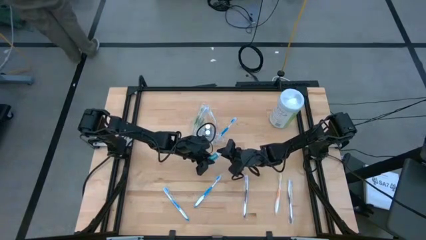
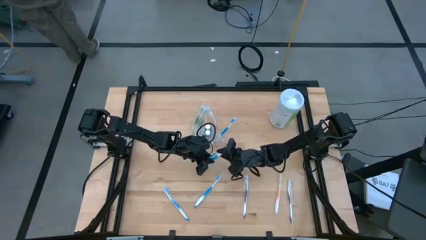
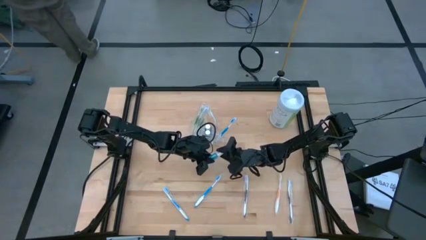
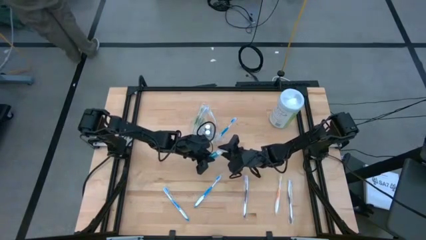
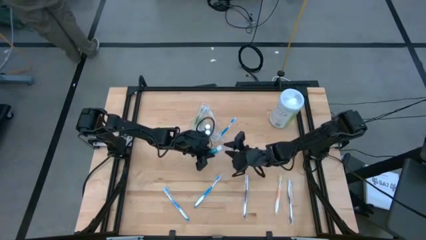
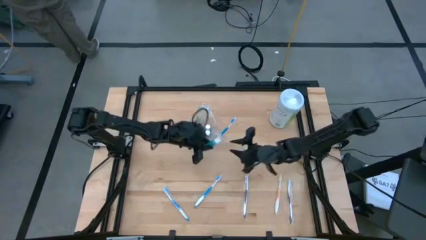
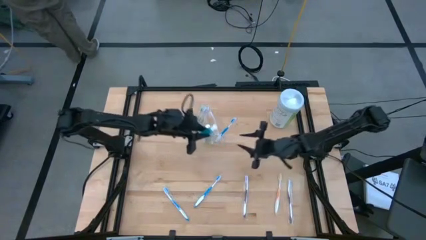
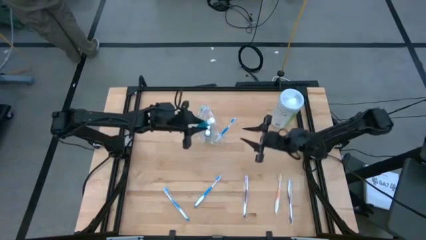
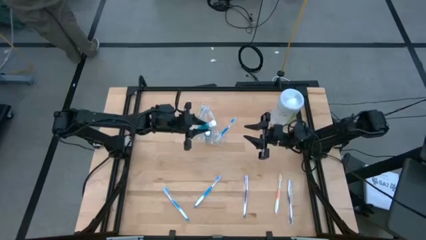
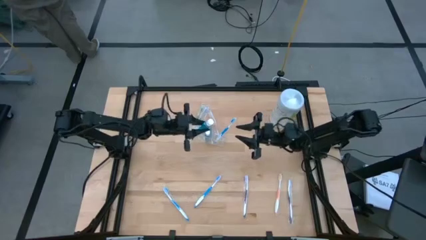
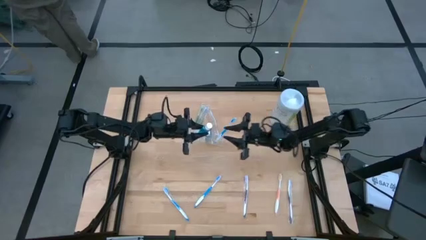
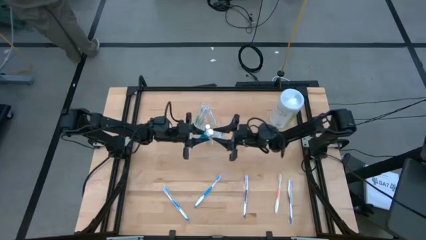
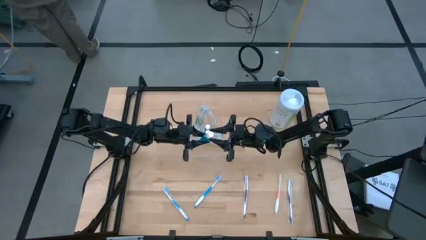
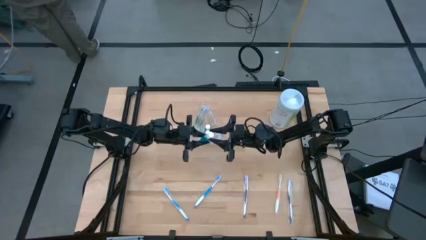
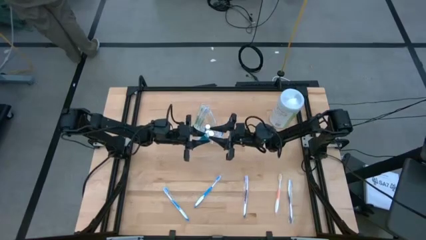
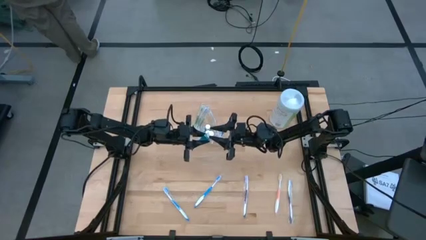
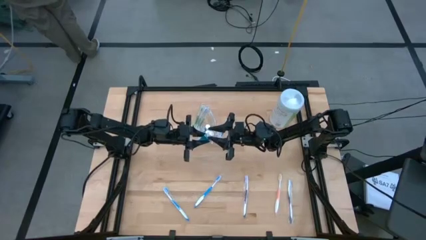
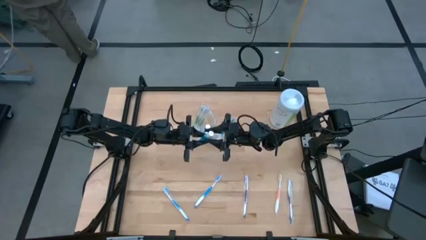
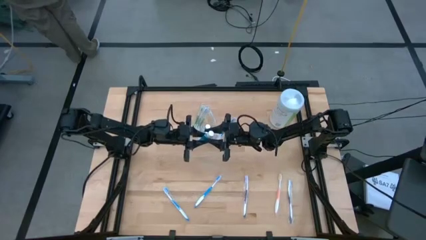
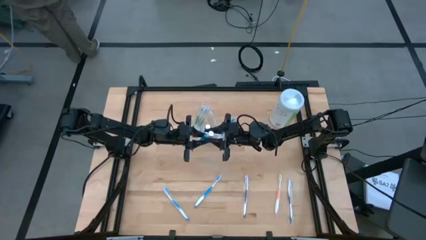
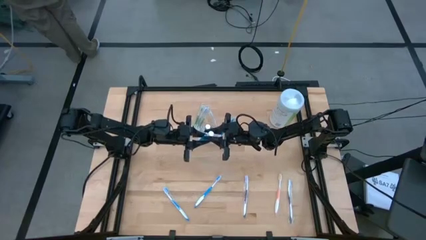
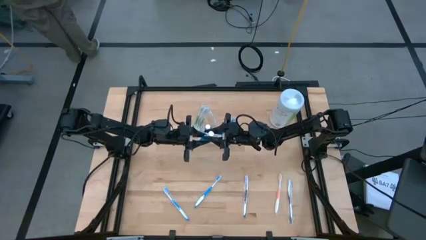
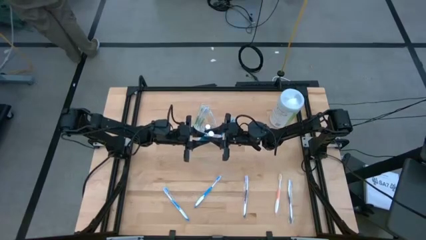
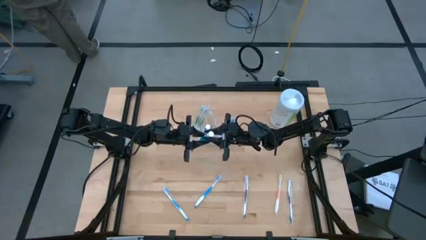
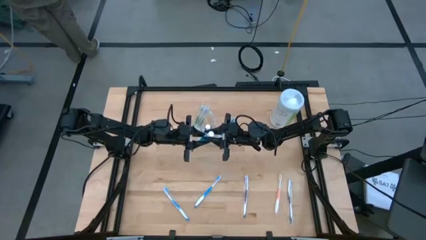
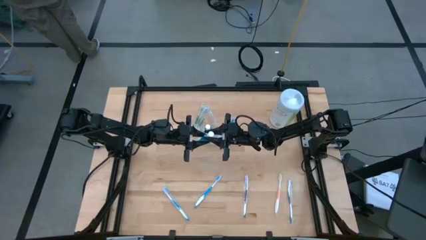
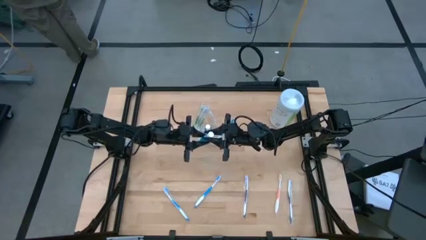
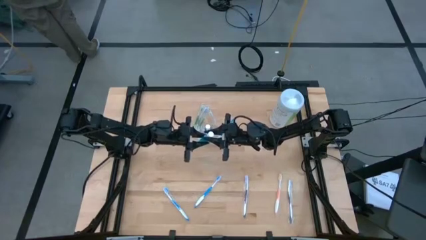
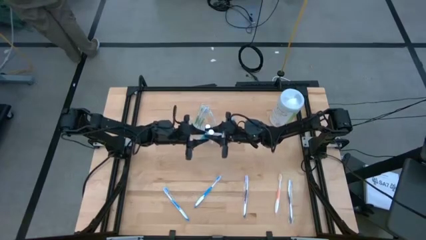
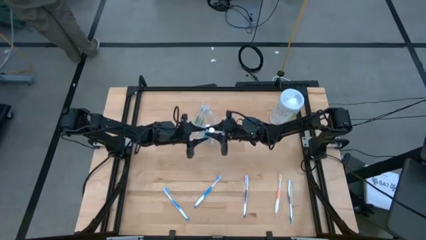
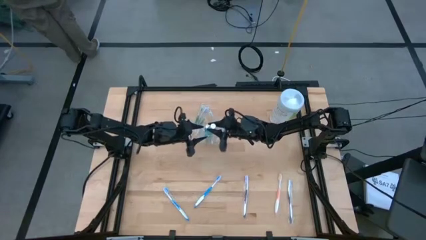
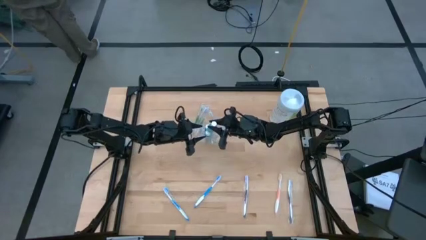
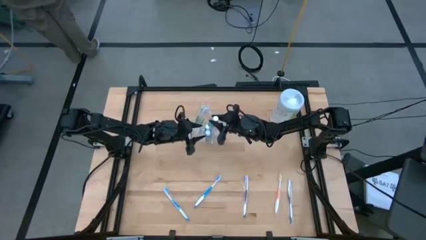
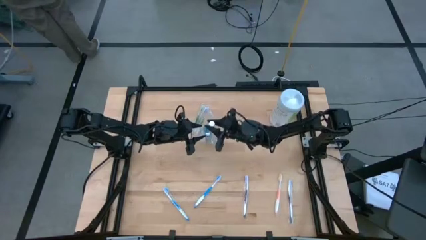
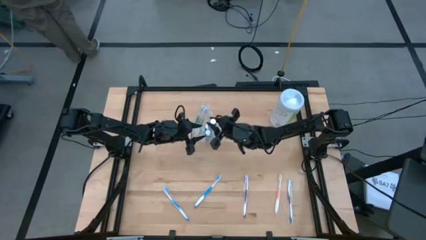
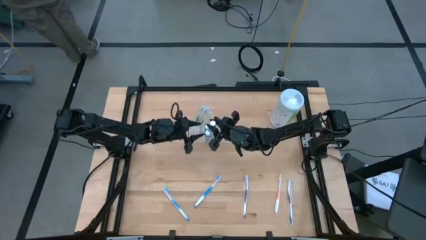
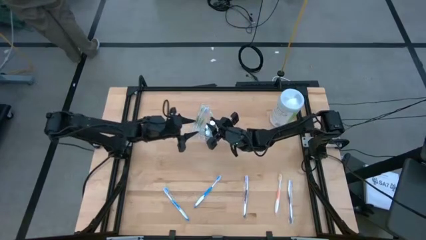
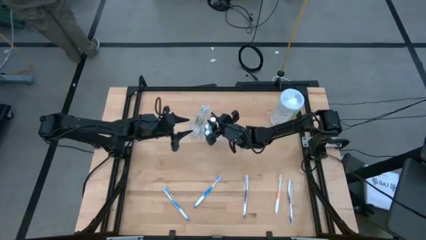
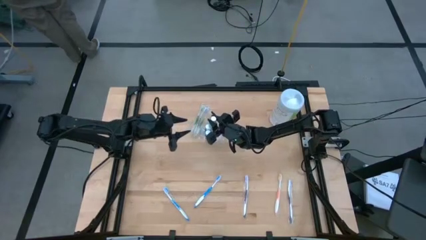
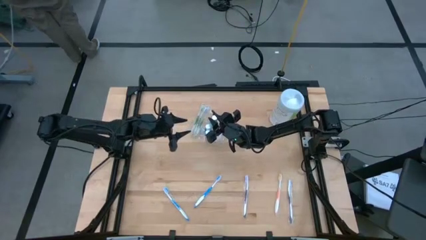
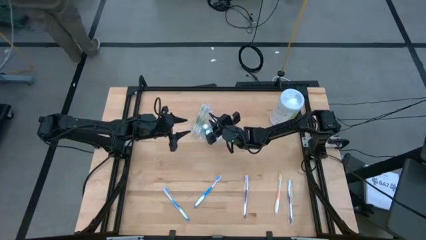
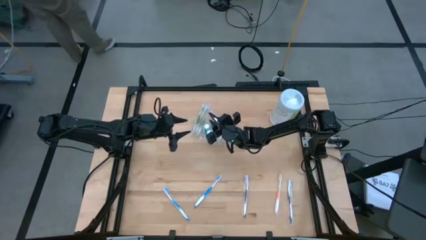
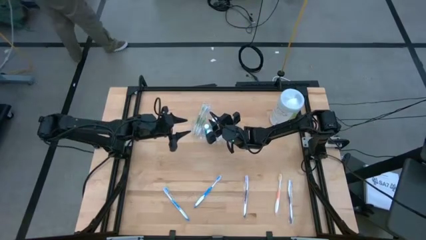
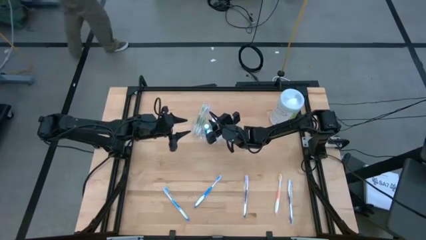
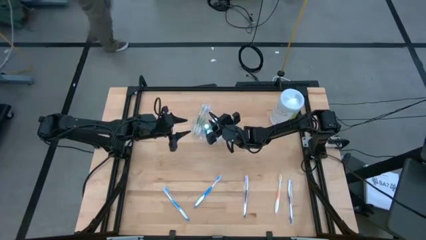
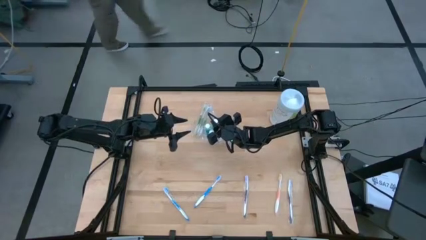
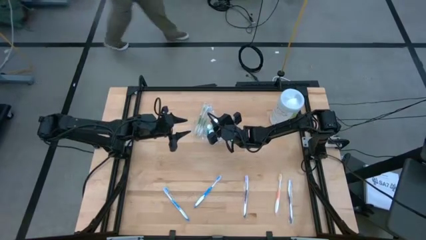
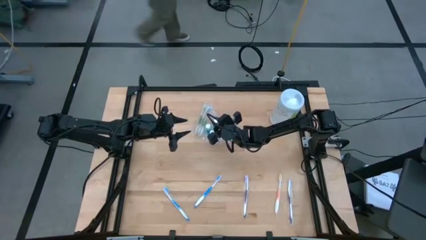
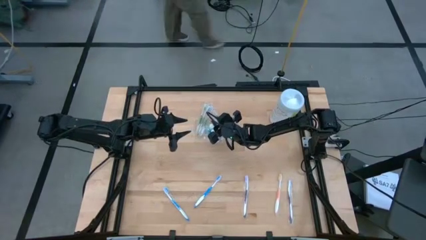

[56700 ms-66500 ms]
Task: Pick & Place toothbrushing station
Put the blue mouthwash into the middle section of the transparent organizer

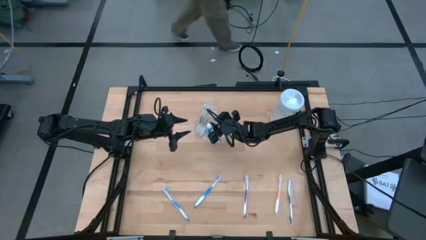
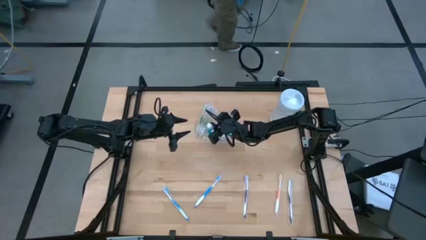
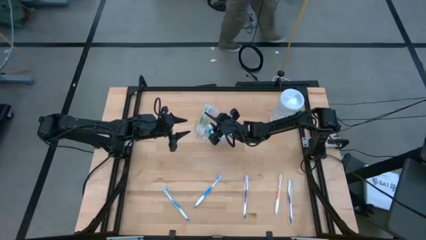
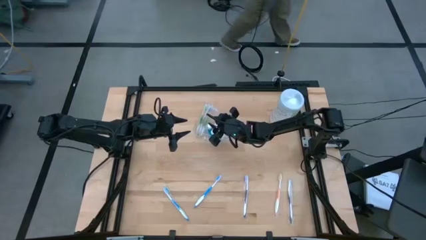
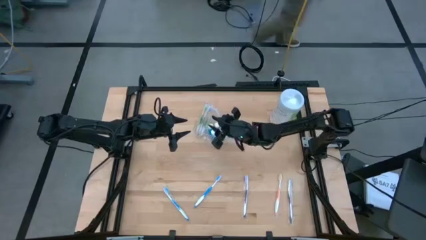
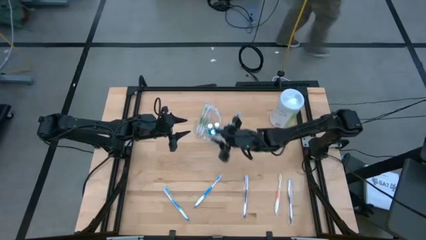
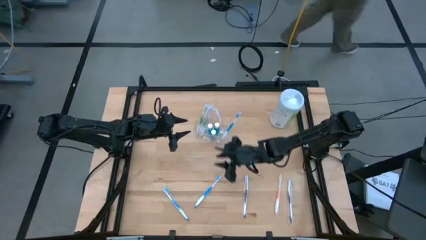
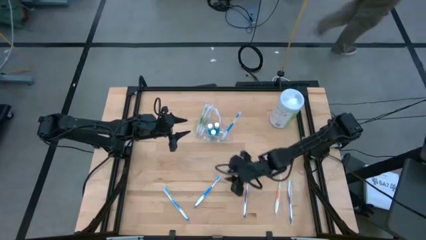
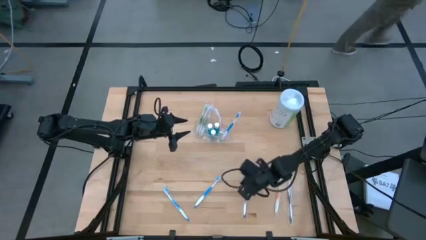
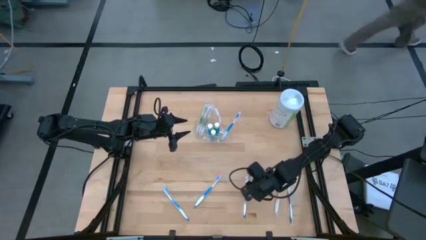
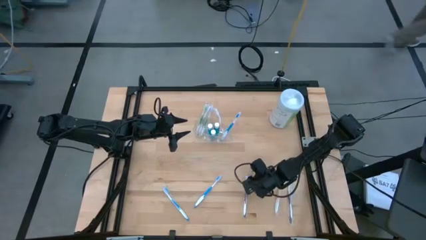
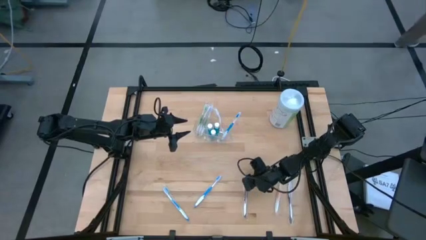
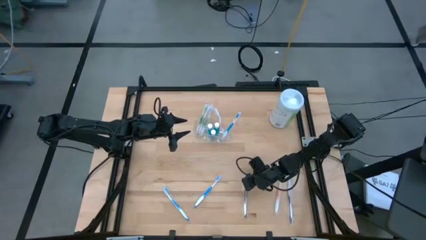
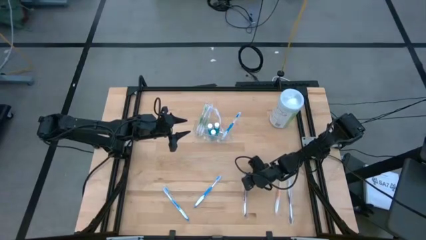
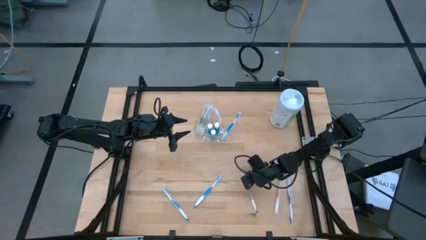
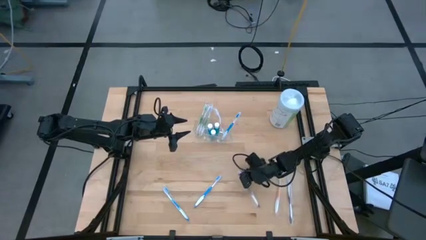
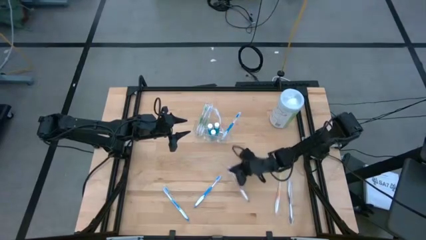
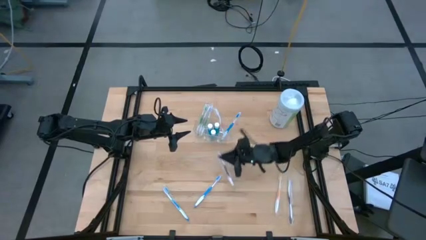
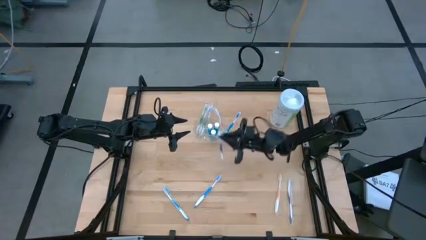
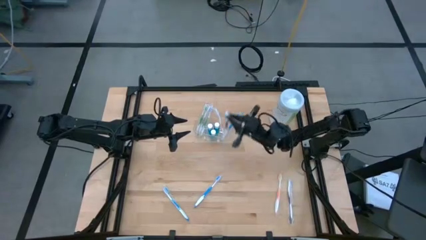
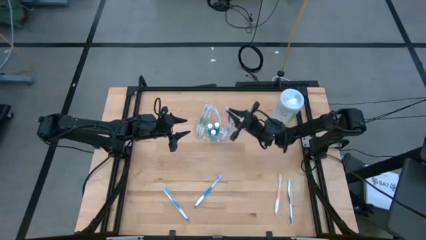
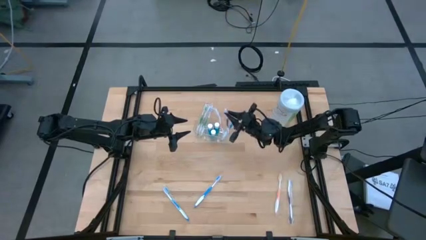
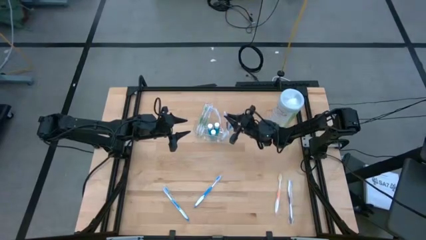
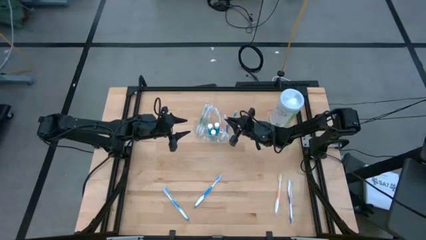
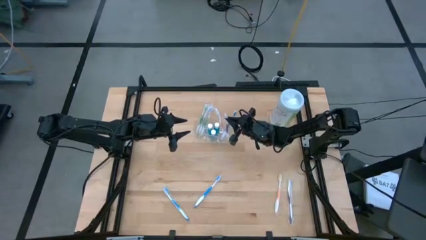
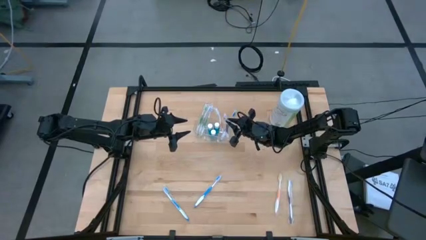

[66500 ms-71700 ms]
Put the purple toothbrush into the right section of the transparent organizer

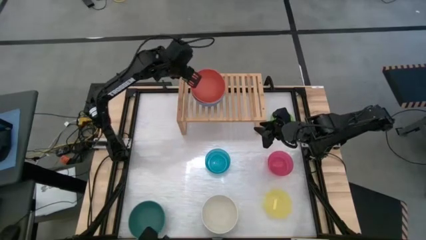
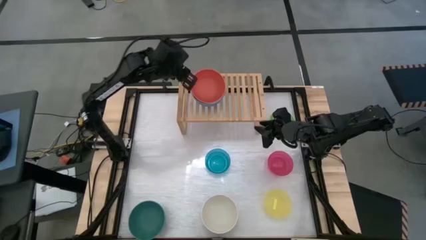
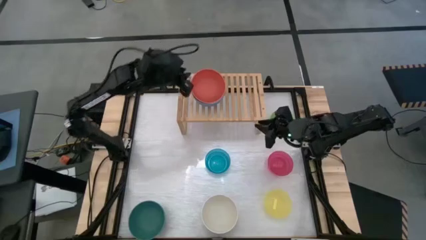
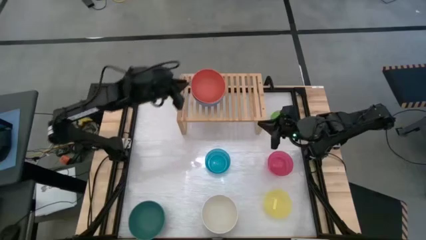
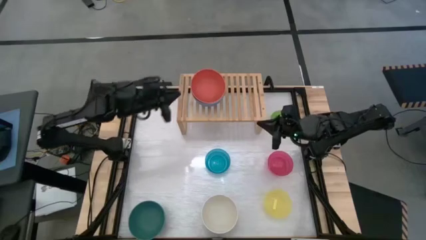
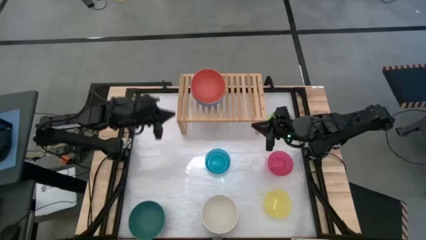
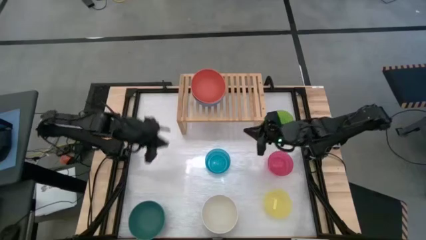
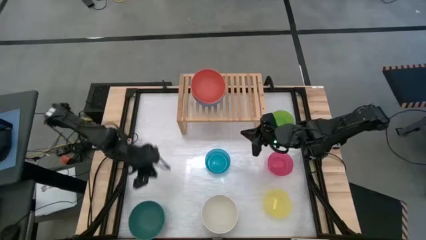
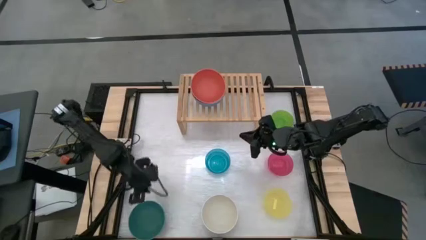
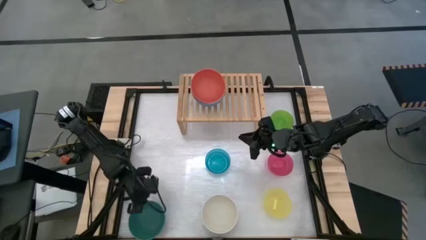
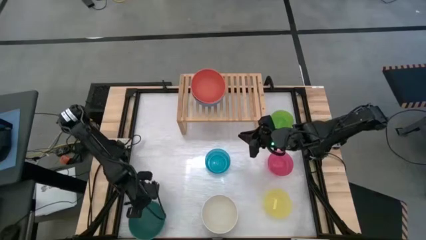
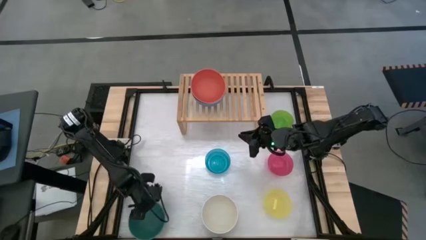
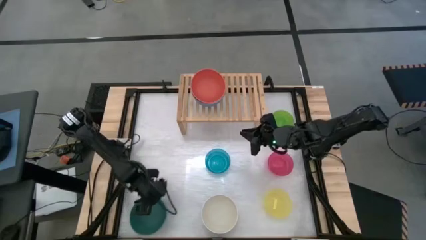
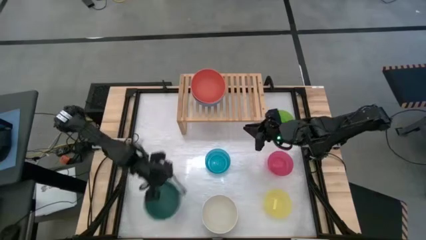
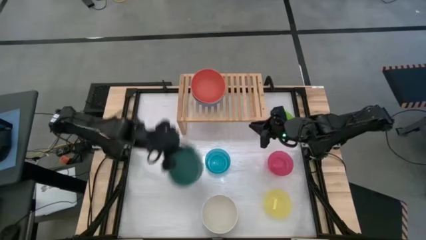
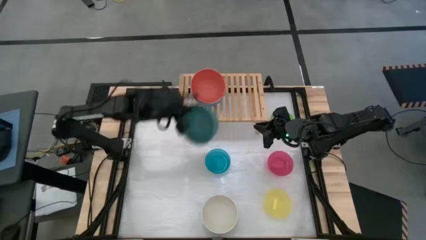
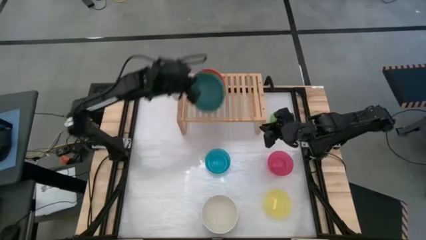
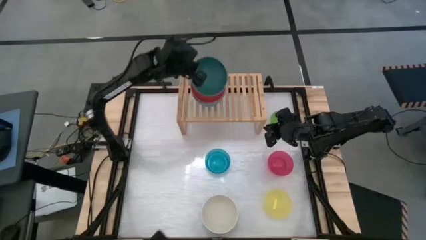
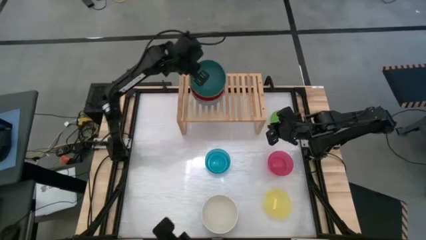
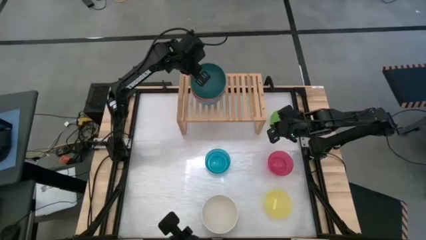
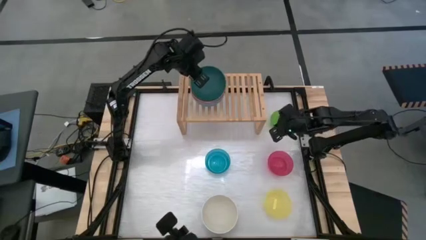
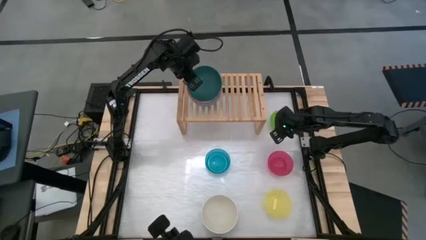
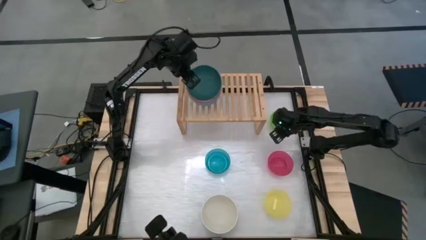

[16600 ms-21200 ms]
Task: Place and stack bowls onto a shelf
Stack the dark green bowl on top of the orange bowl on the shelf
